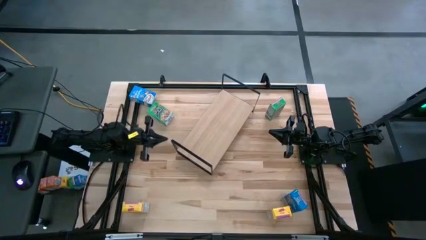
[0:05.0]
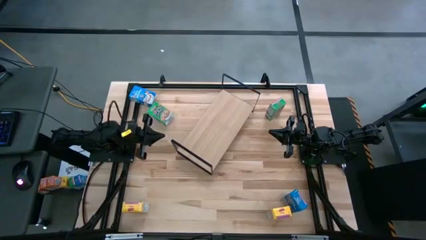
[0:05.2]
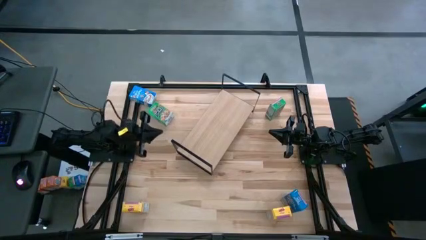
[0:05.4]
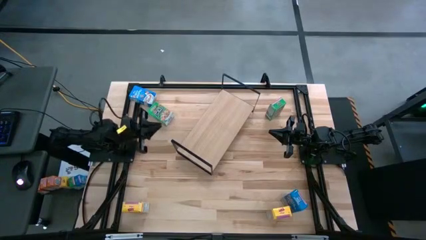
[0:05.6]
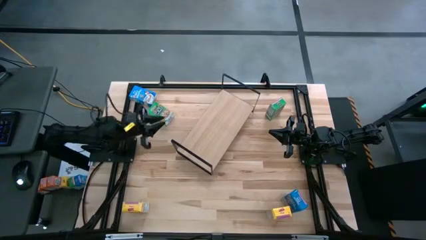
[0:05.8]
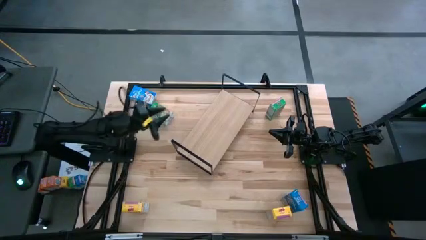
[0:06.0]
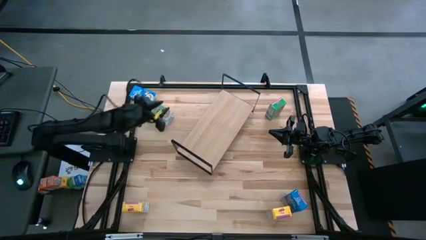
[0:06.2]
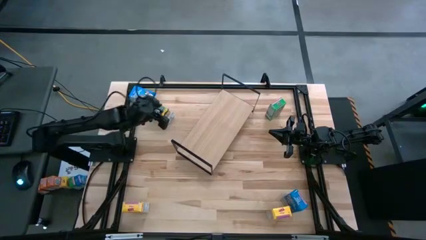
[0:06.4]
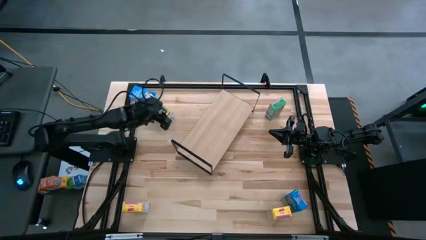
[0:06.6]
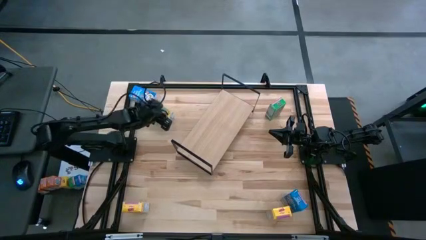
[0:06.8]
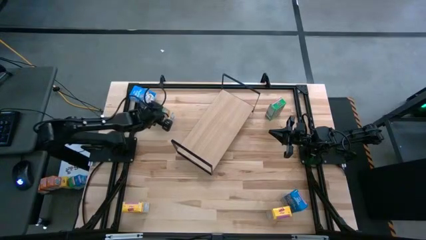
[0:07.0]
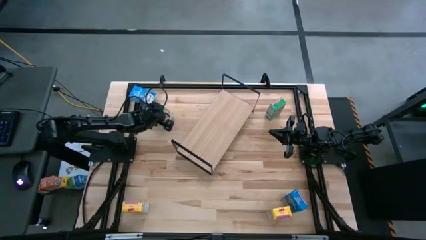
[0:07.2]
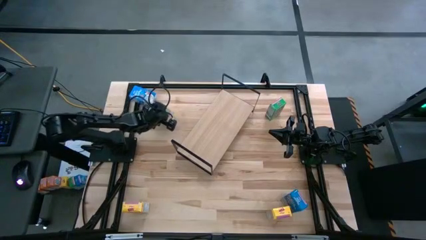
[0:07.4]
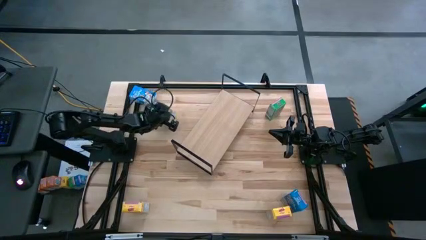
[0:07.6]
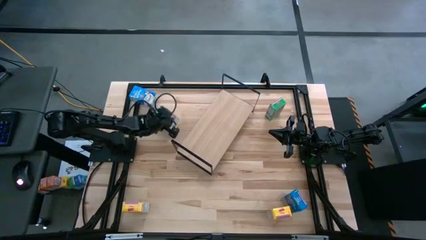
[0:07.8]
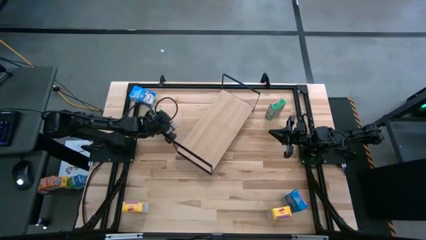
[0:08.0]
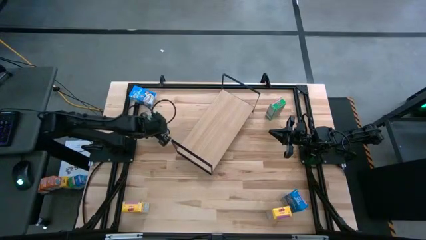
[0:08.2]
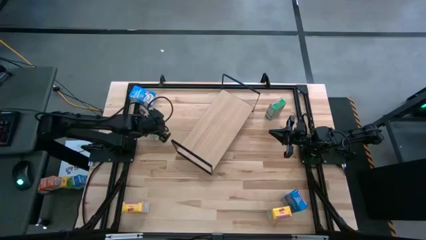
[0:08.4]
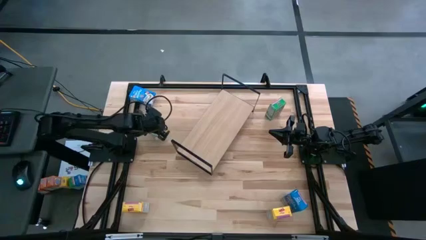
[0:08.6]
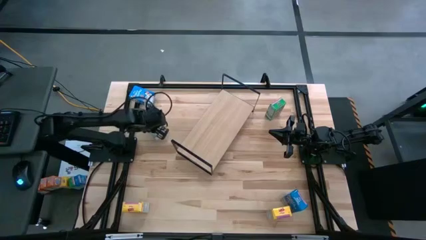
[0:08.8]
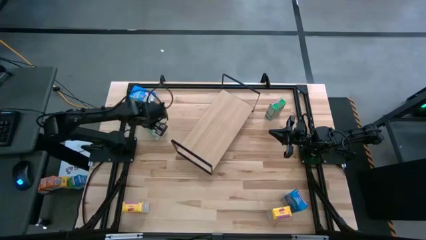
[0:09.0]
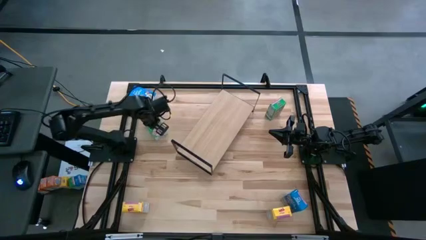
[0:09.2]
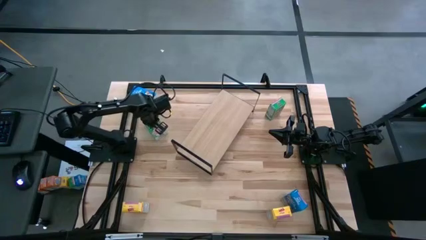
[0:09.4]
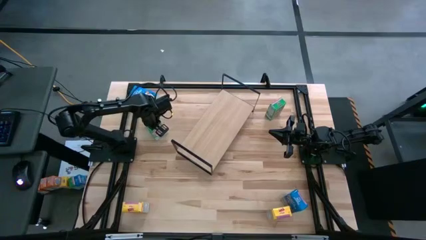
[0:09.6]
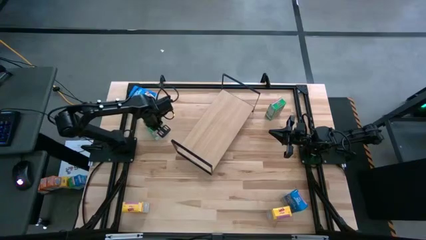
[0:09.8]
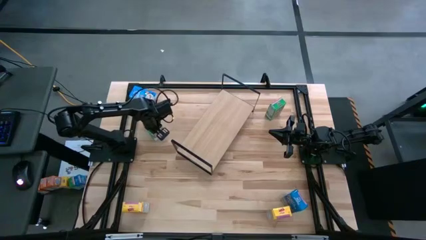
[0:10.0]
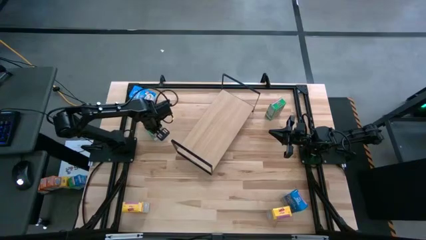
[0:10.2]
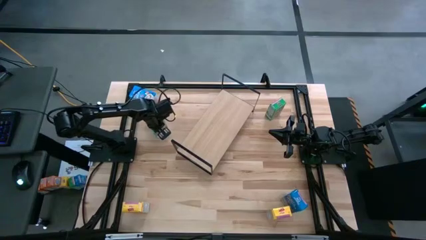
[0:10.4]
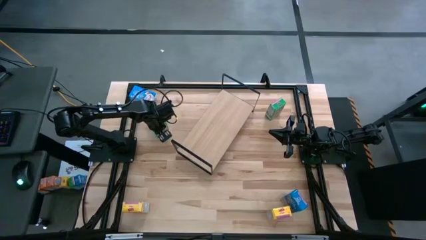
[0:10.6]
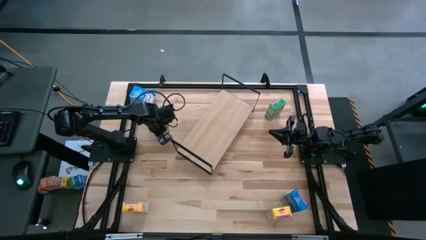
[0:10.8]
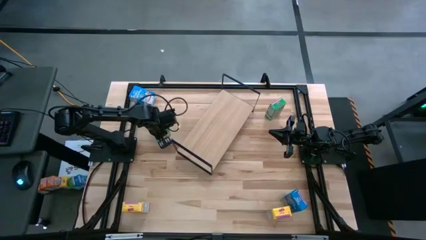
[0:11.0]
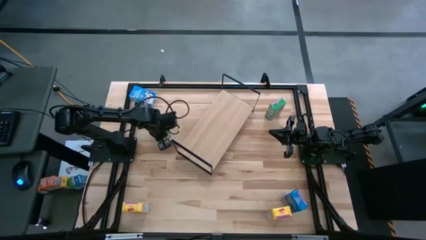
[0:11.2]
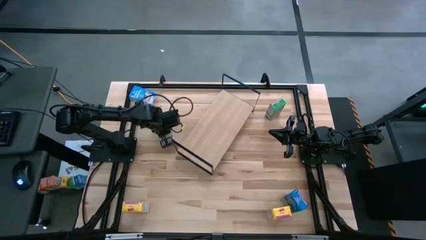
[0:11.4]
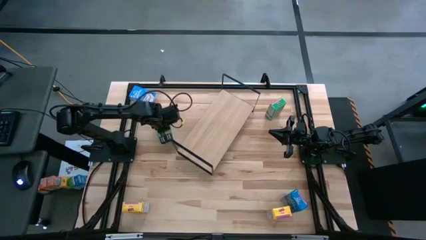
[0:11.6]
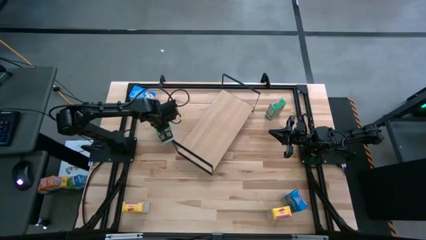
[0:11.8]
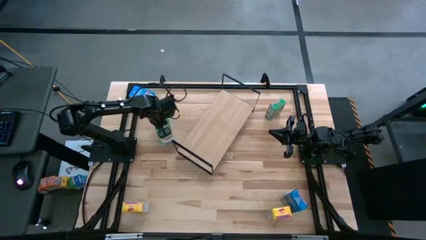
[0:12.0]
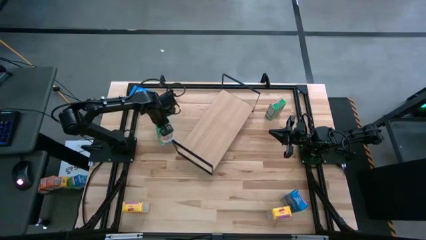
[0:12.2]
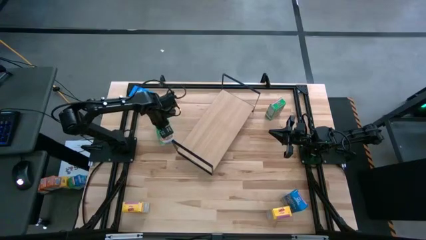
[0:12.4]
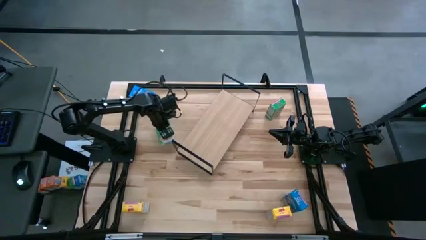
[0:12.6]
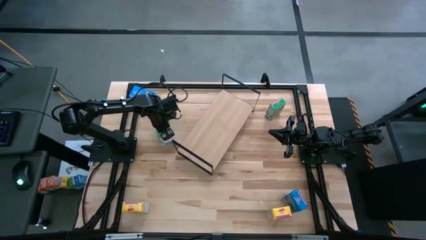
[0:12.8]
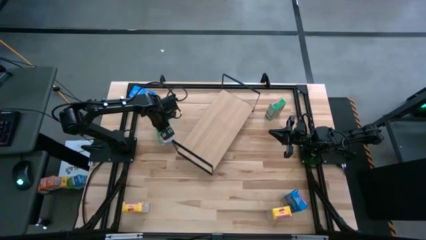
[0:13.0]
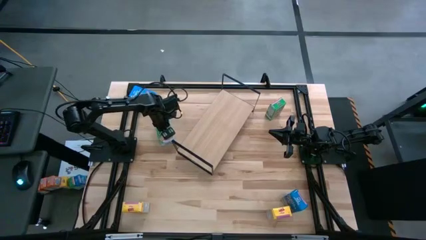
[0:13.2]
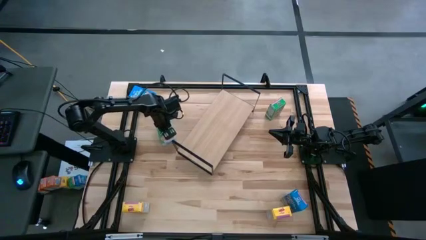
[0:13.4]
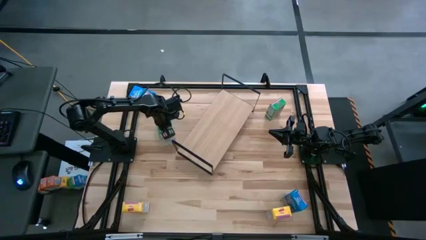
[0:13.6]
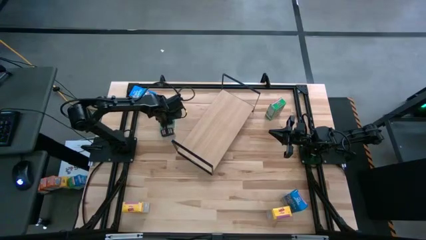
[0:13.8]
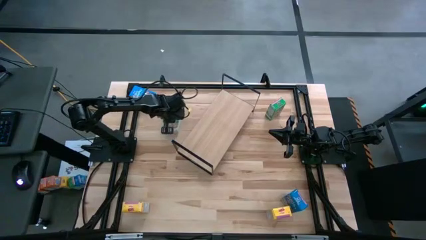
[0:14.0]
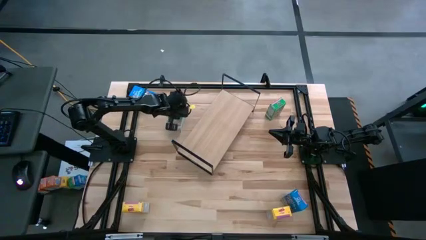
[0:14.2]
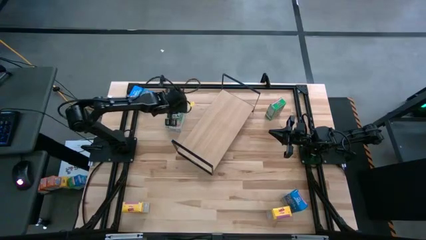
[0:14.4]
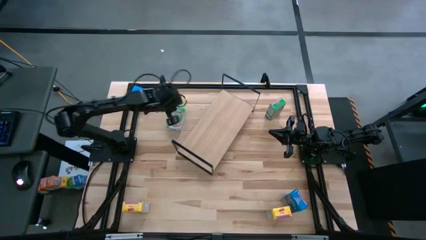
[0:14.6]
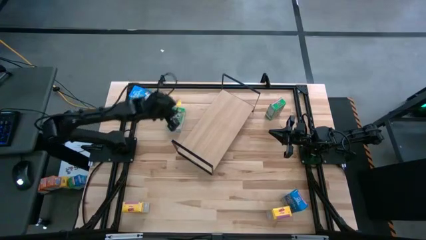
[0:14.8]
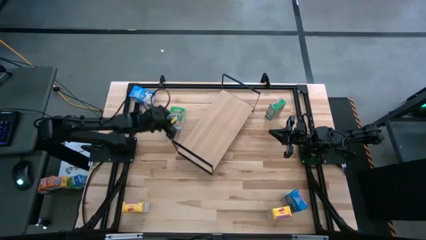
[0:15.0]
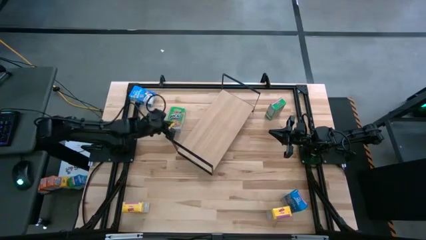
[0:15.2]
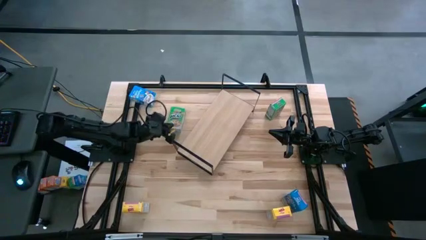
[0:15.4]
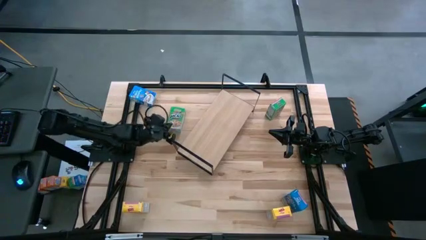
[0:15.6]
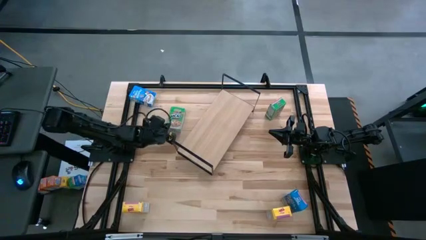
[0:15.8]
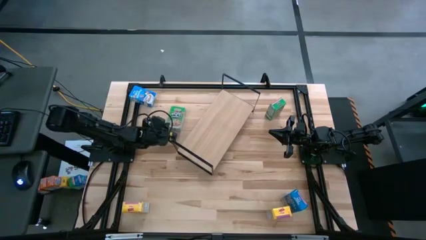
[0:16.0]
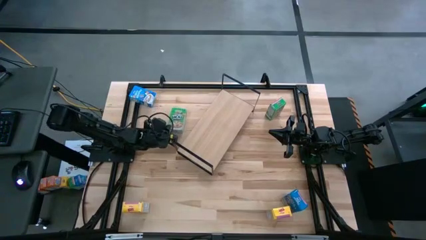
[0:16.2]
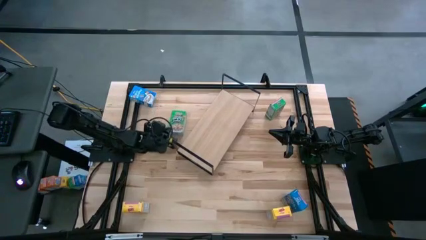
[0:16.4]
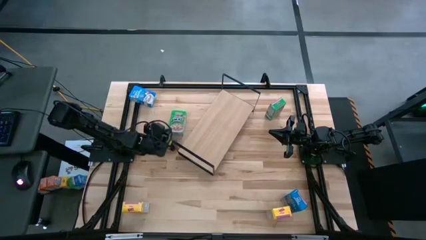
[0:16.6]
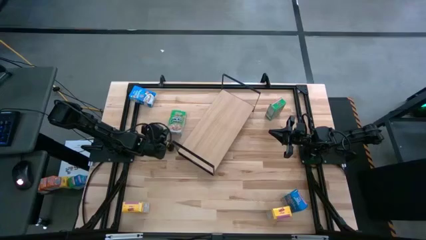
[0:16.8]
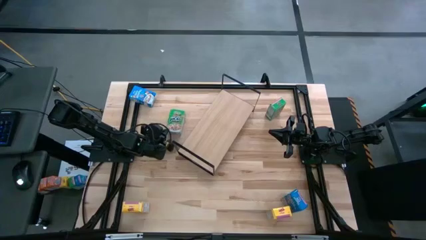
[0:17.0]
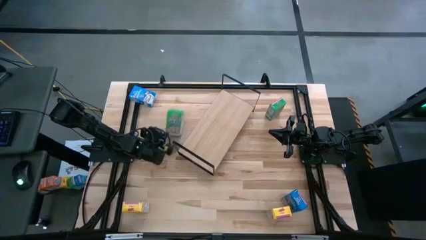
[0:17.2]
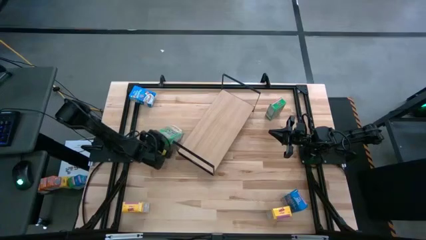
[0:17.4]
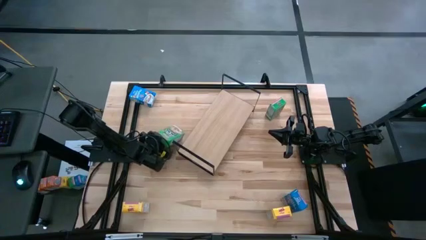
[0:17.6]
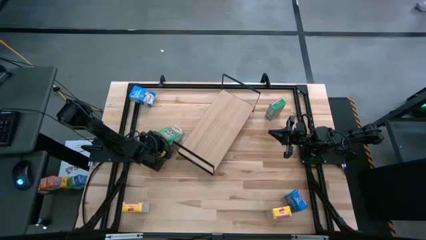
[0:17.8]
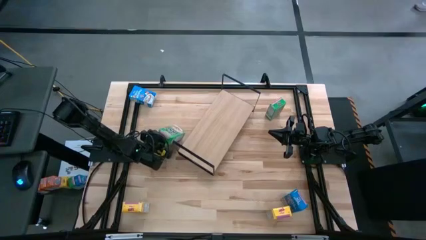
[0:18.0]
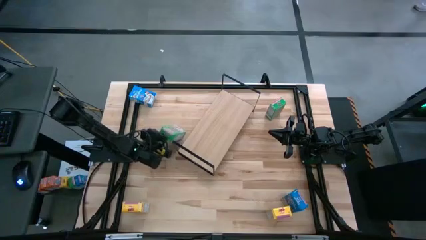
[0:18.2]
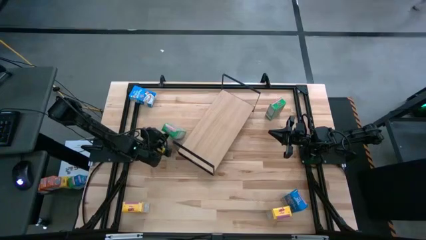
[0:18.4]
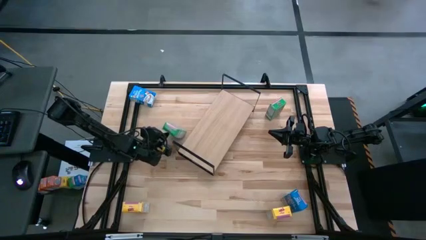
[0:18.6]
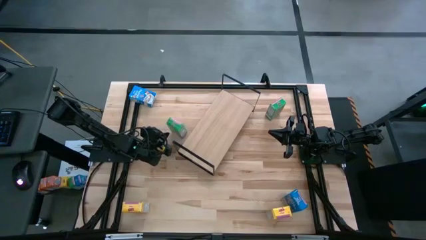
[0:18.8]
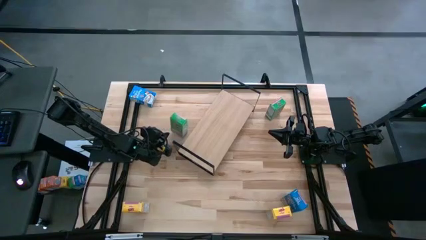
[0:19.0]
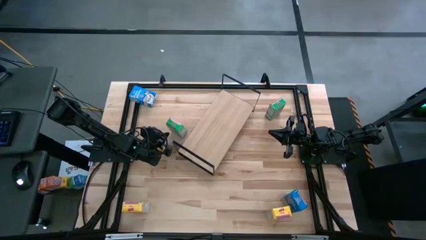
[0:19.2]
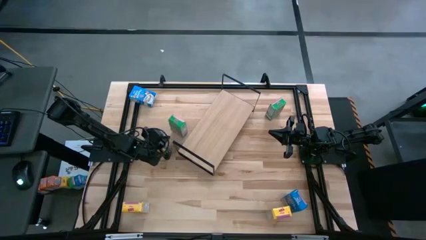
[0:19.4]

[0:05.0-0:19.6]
Task: Stack cereal on shelf
Put the left green cereal box on the shelf
